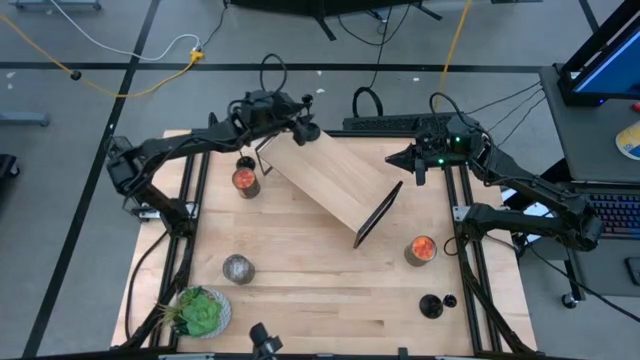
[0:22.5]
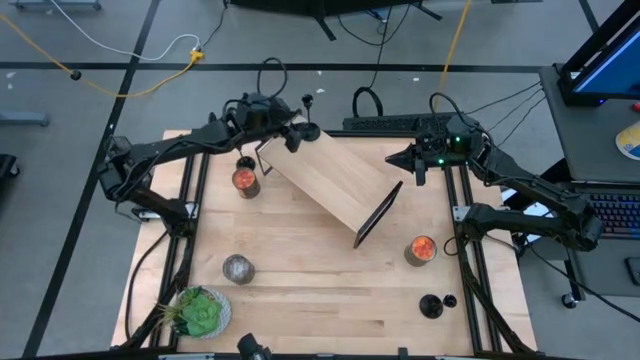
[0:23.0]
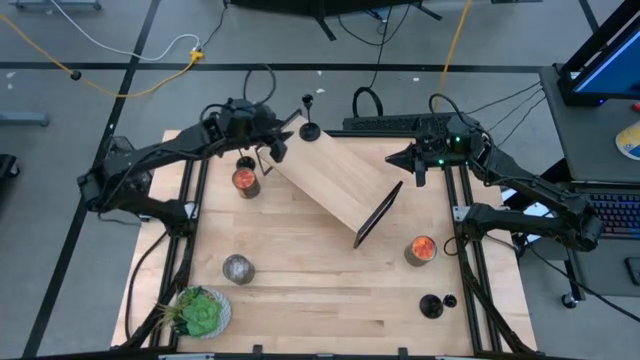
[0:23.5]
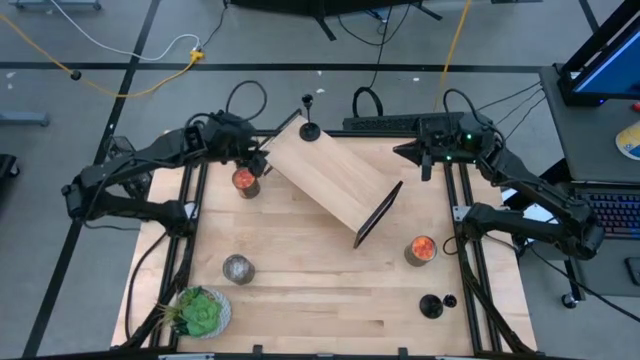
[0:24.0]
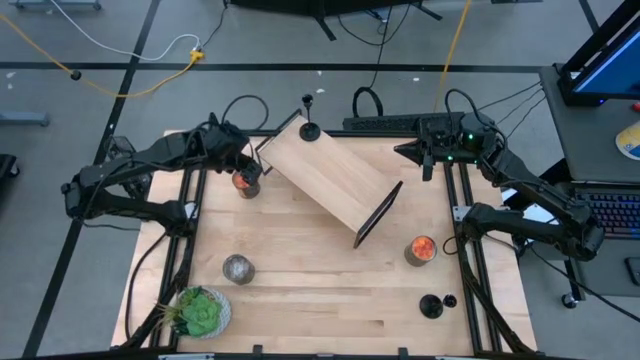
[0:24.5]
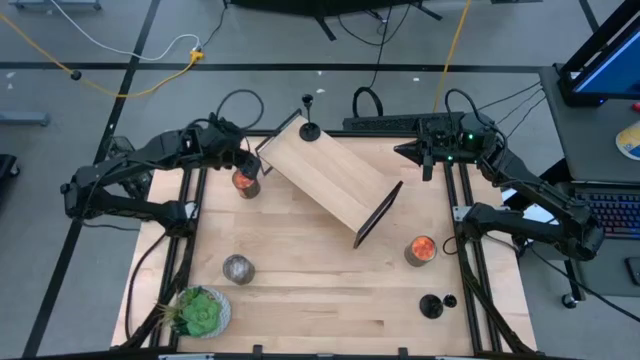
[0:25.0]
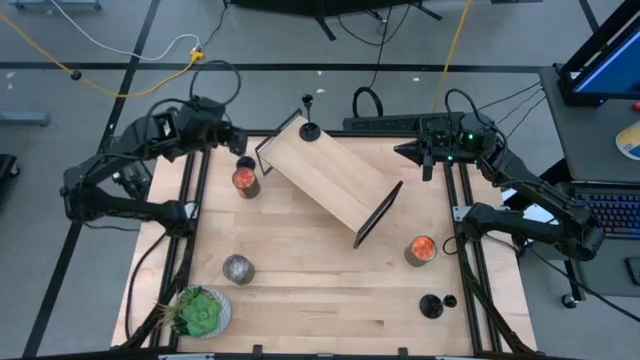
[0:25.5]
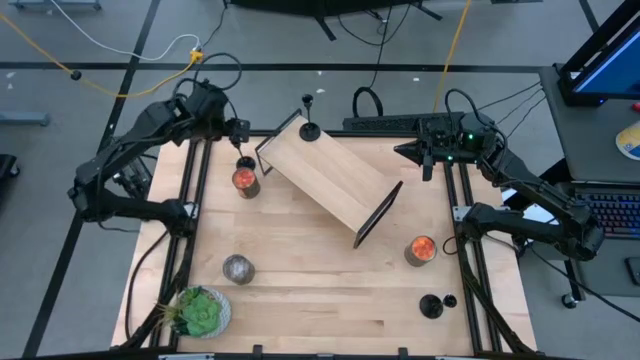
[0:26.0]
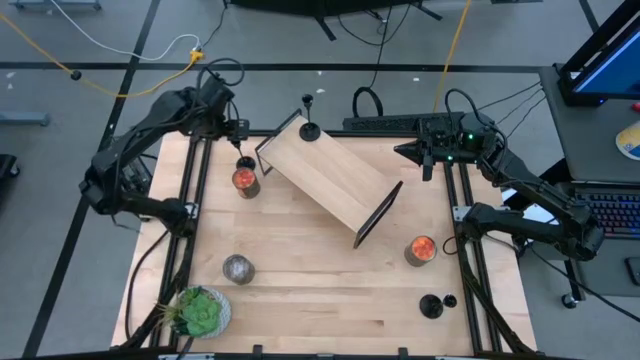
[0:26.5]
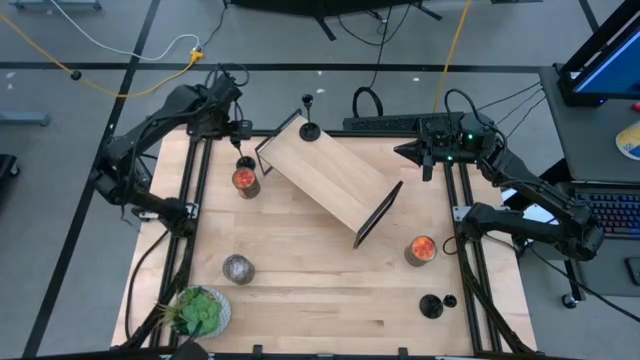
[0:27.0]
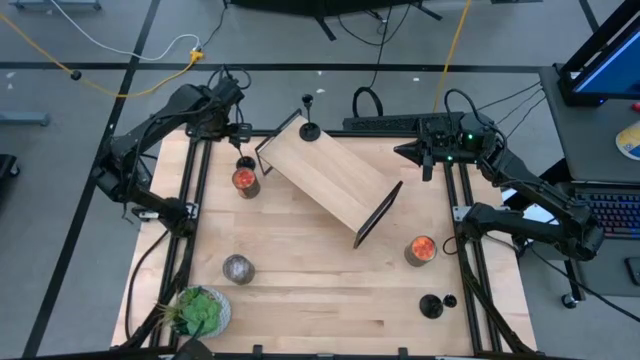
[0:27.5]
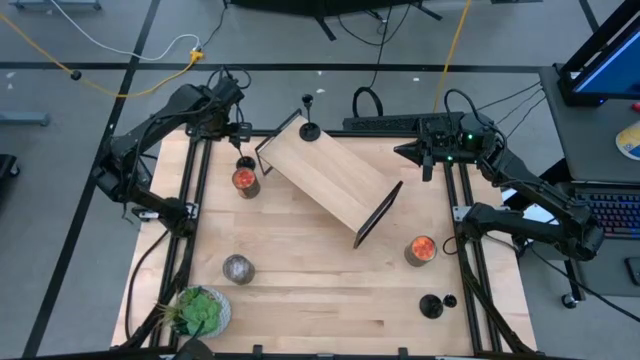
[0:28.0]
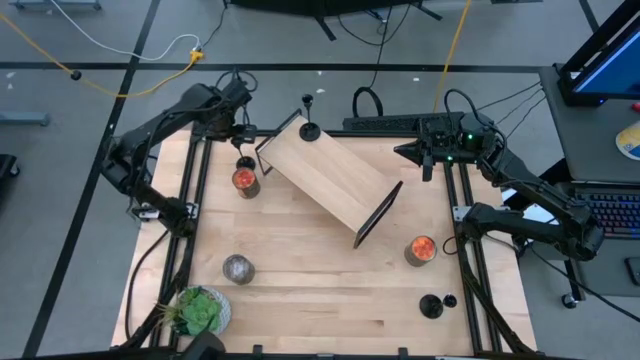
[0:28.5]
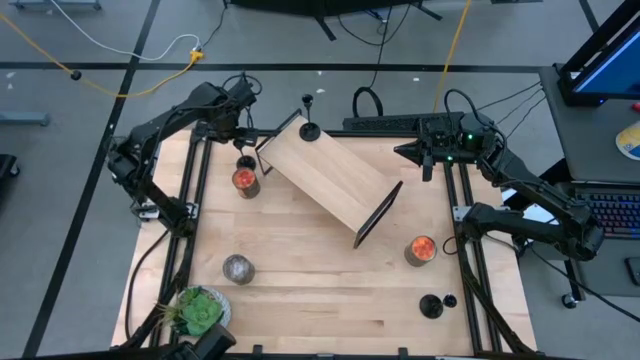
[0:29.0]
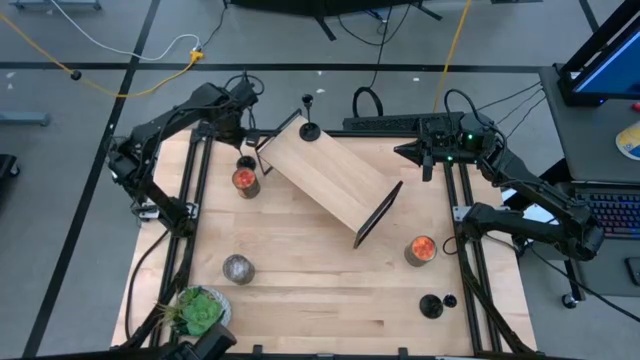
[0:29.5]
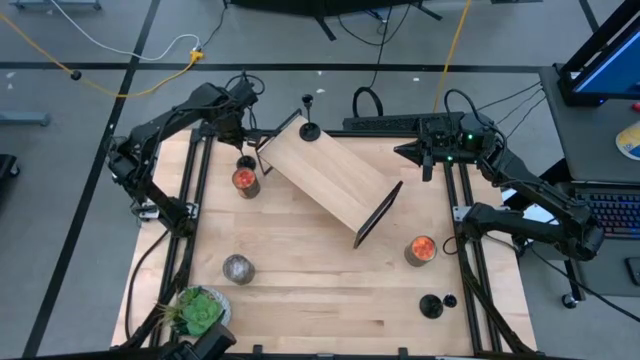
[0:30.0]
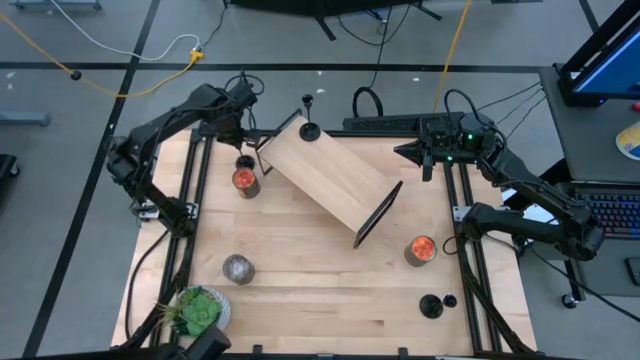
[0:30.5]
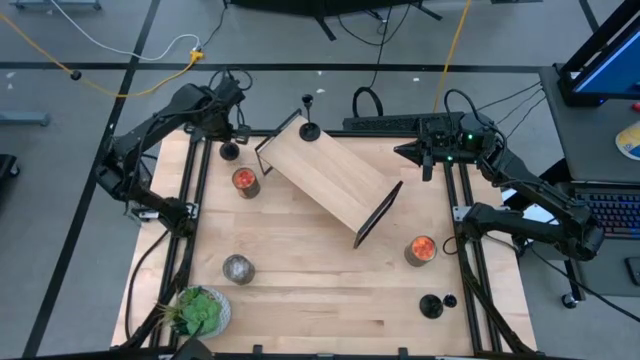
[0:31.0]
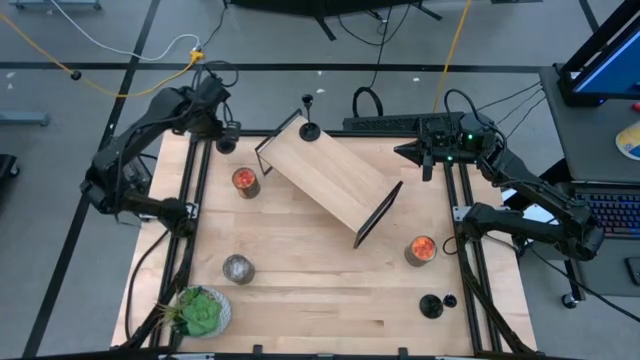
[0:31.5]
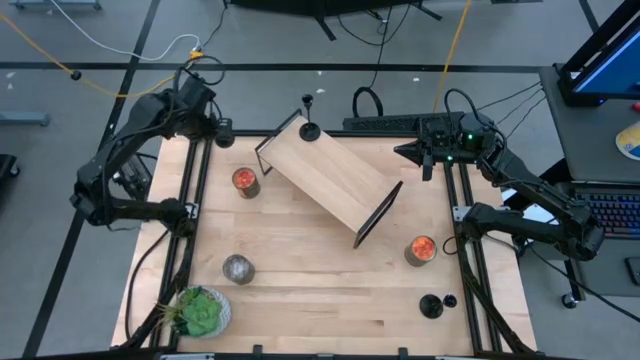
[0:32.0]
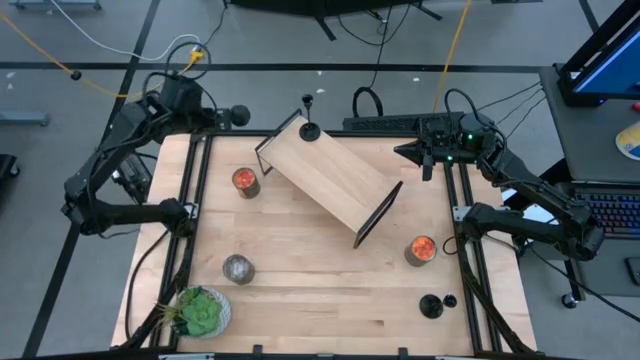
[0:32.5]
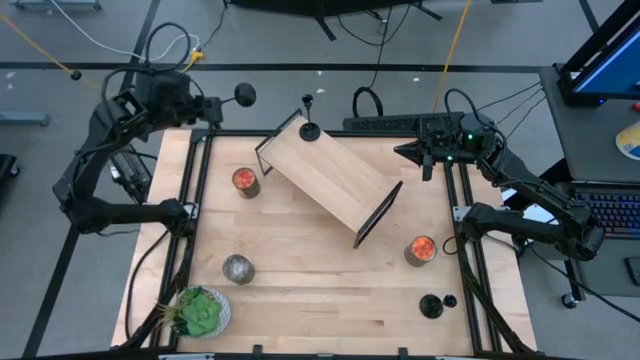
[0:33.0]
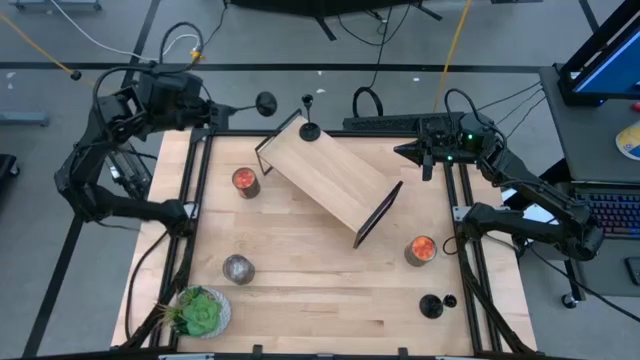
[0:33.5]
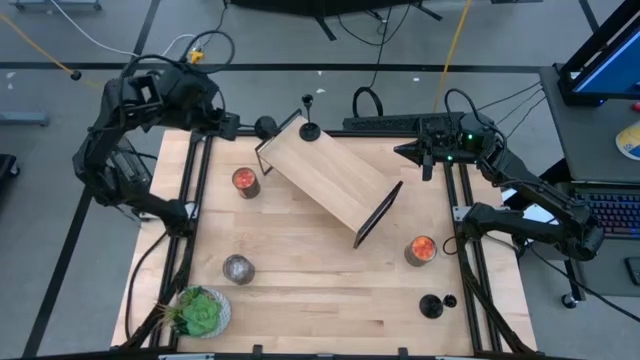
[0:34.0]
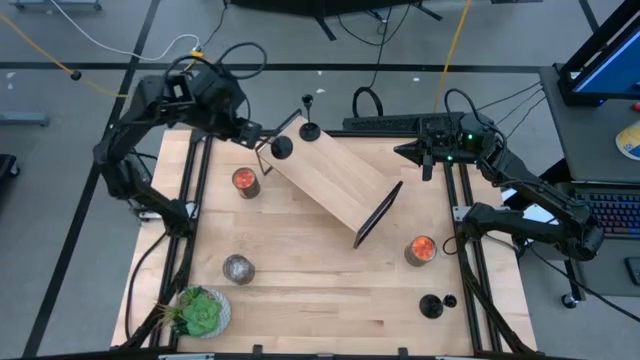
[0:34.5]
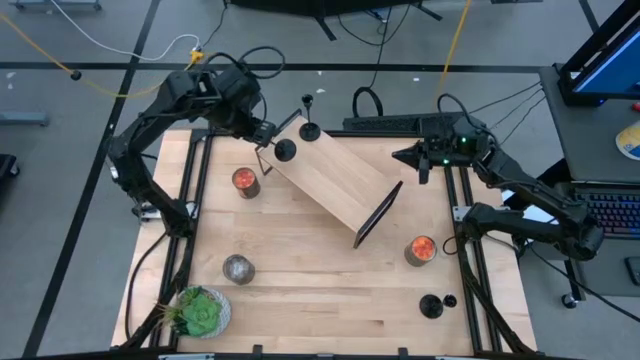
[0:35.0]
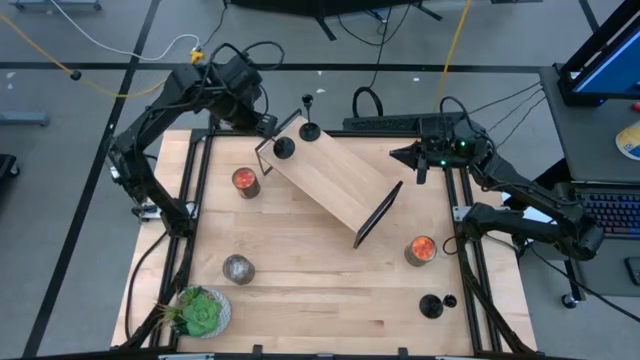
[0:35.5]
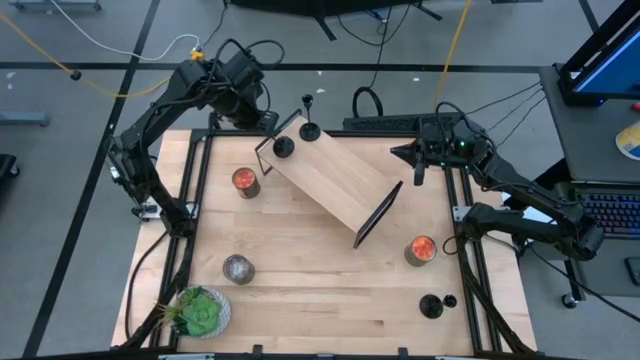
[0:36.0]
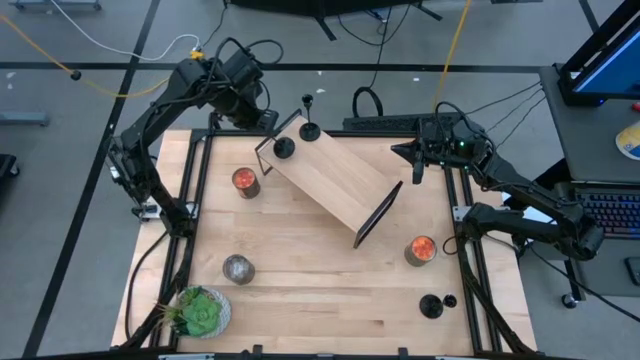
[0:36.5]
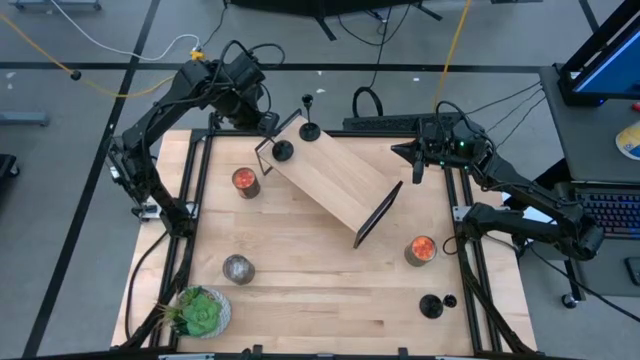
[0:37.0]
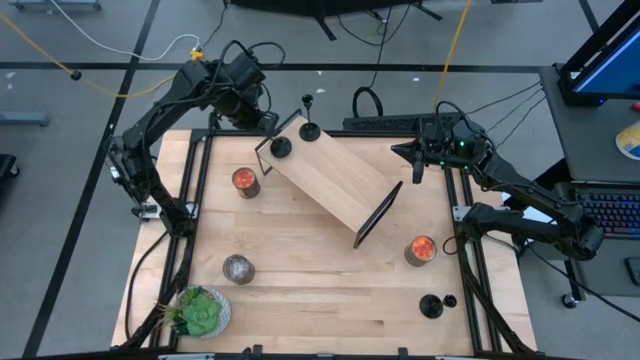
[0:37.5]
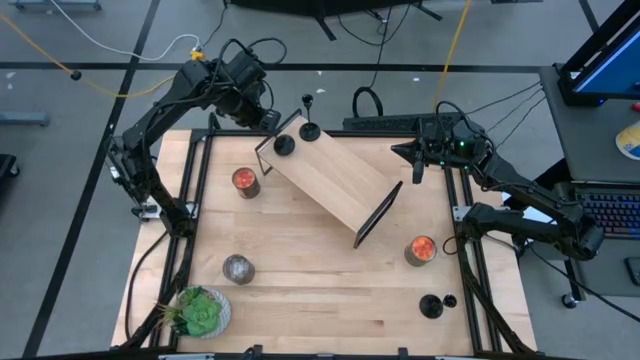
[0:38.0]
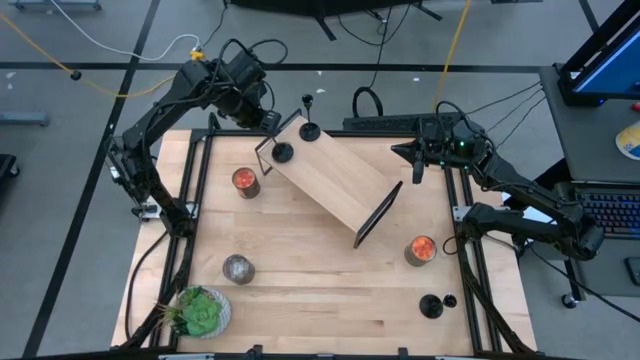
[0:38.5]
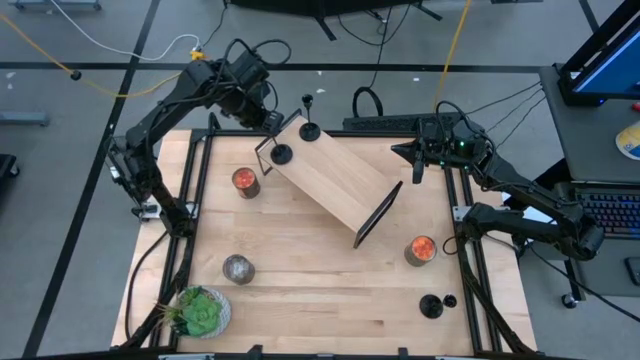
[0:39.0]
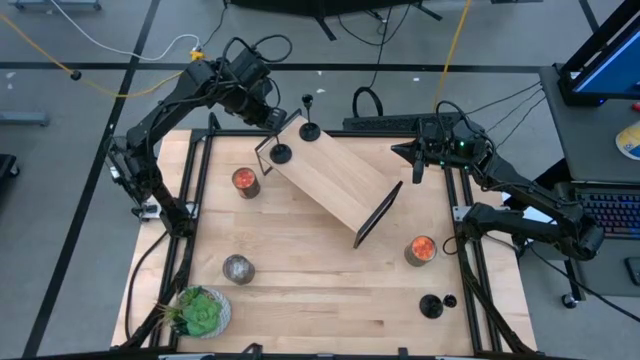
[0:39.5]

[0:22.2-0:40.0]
Task: Pick & Place candle stick holders
Put the top black candle holder on the shelf

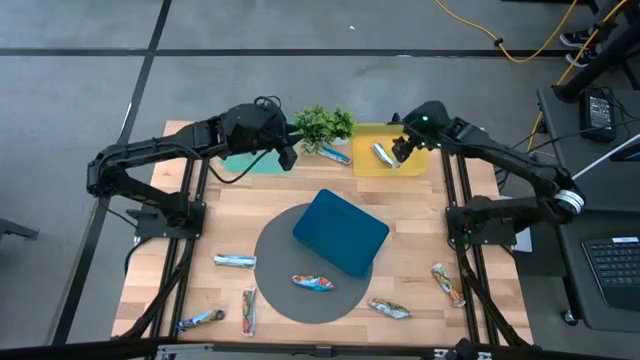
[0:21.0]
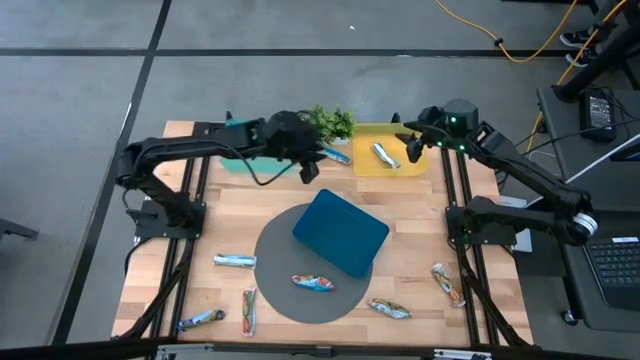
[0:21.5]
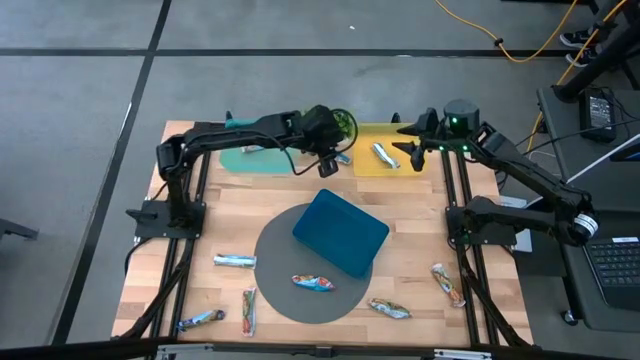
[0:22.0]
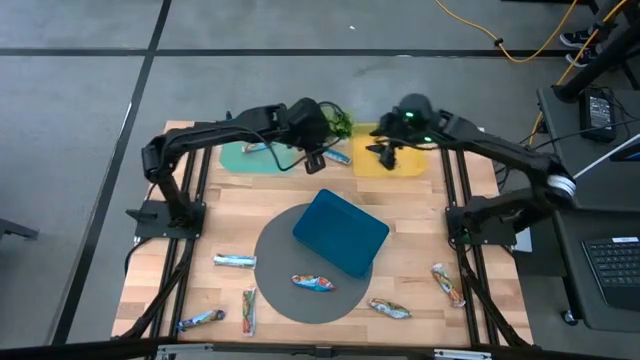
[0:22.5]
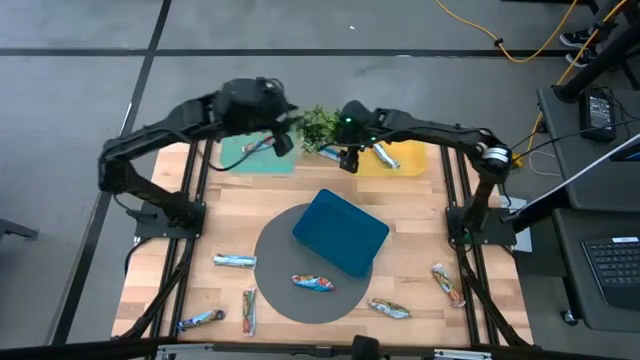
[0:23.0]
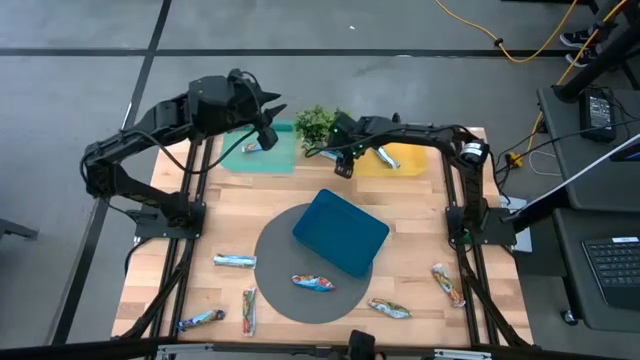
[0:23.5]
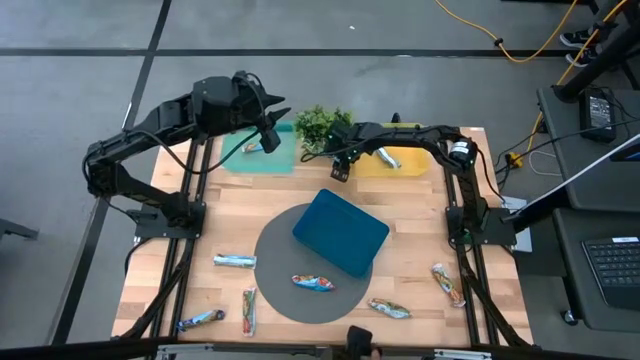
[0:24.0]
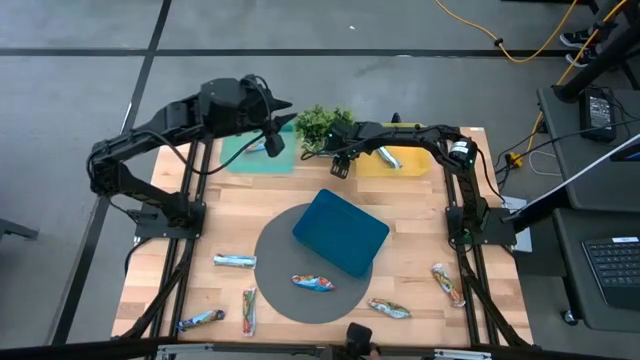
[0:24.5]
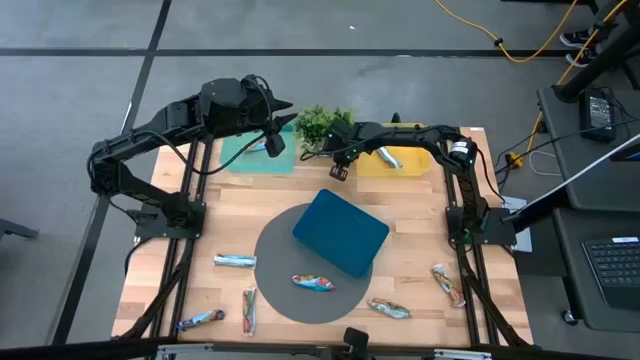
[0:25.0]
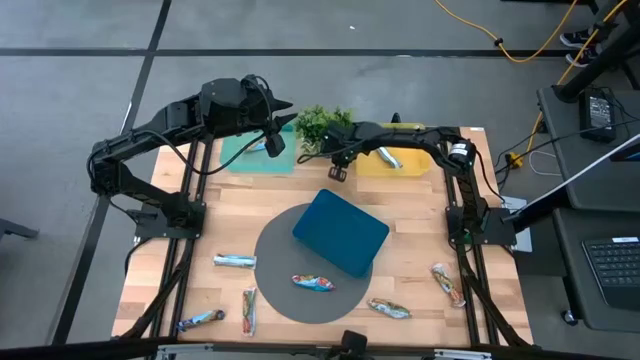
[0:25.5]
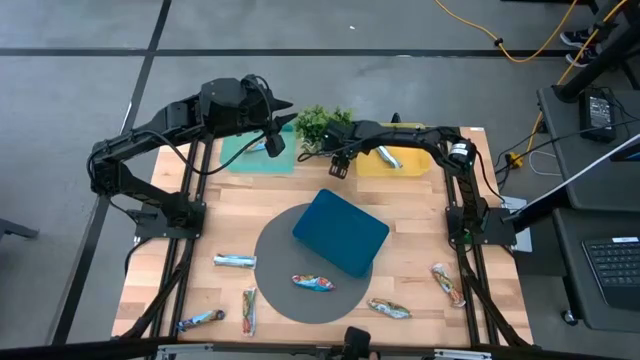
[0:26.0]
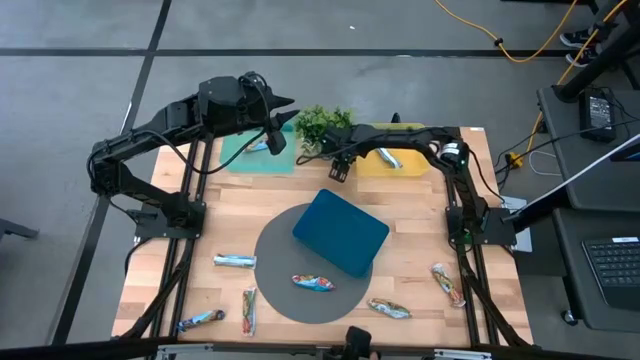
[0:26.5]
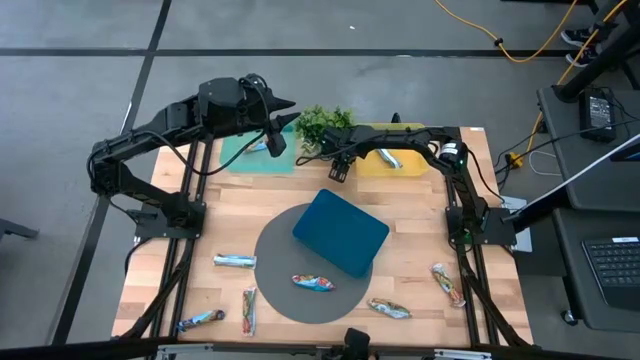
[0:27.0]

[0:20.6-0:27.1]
Task: Pick and place Granola Bars by type
Put the top blue granola bar into the blue bin
